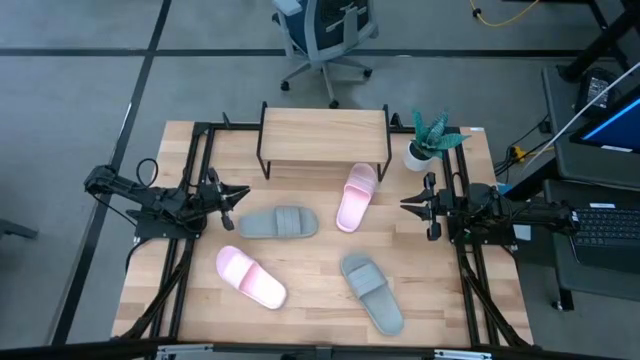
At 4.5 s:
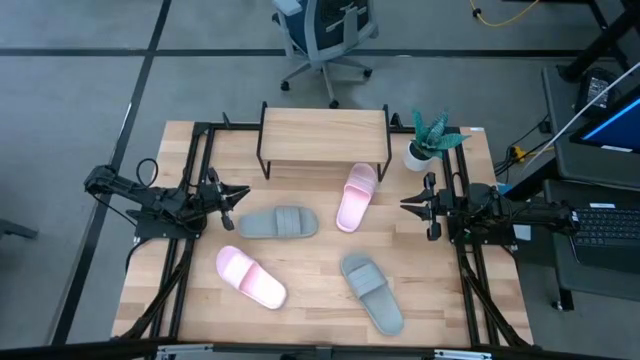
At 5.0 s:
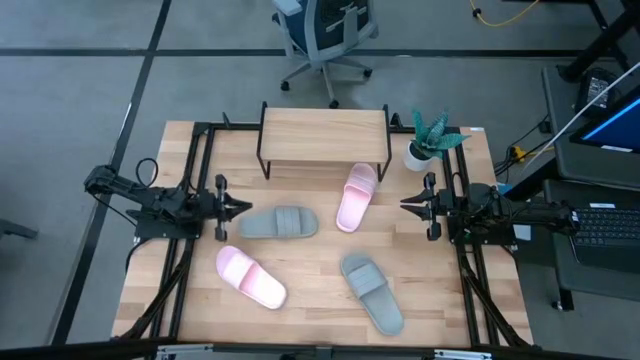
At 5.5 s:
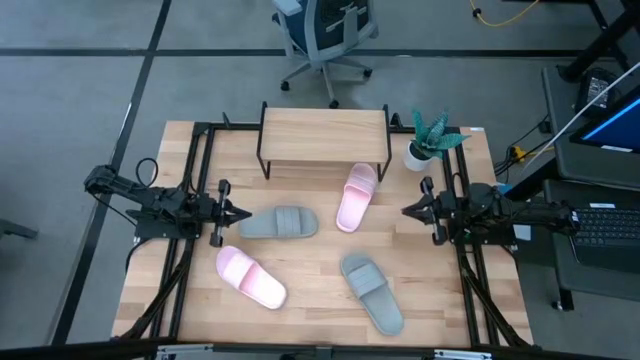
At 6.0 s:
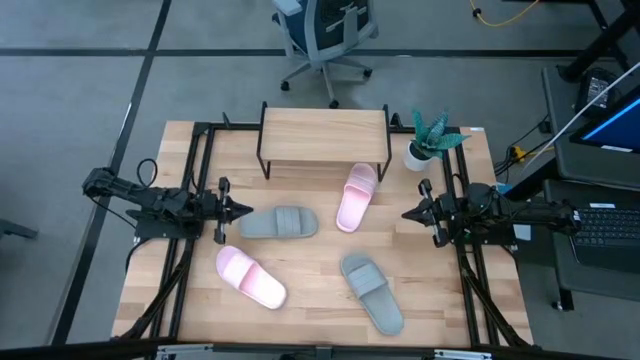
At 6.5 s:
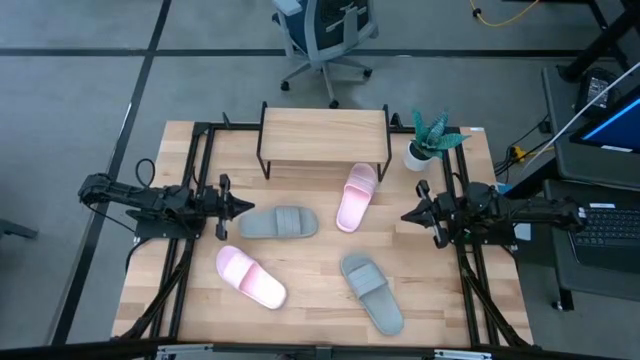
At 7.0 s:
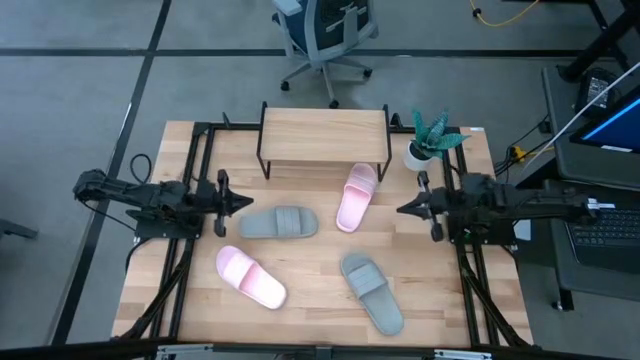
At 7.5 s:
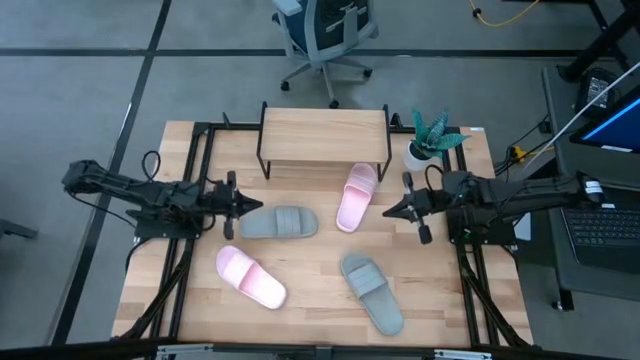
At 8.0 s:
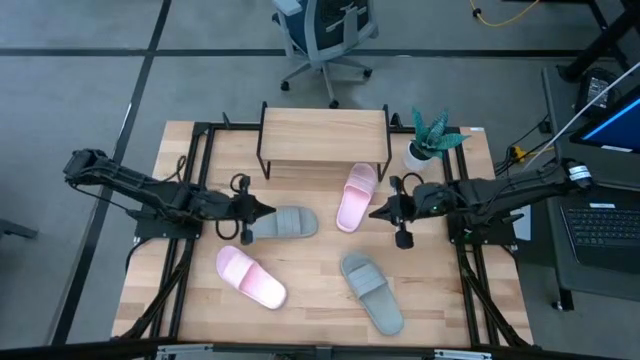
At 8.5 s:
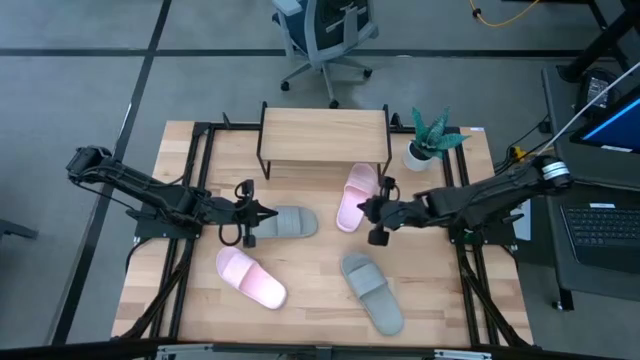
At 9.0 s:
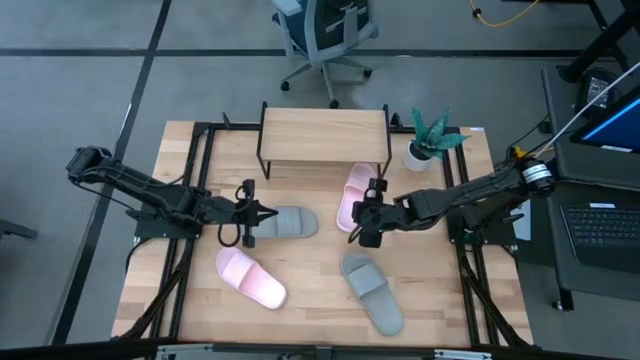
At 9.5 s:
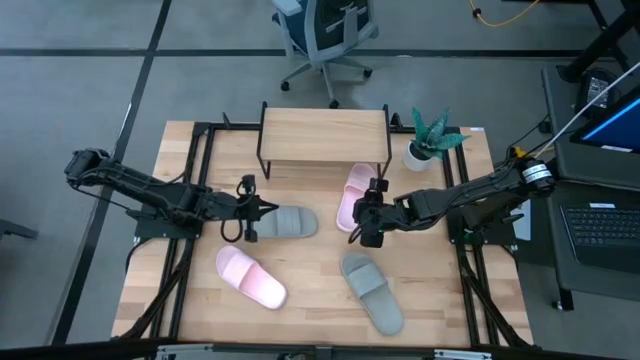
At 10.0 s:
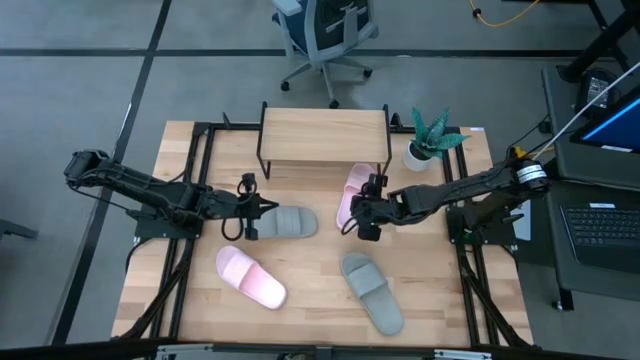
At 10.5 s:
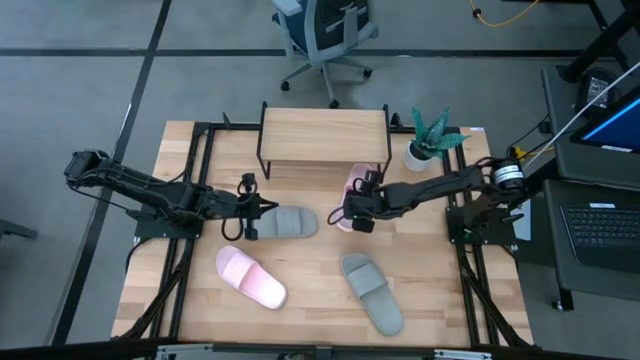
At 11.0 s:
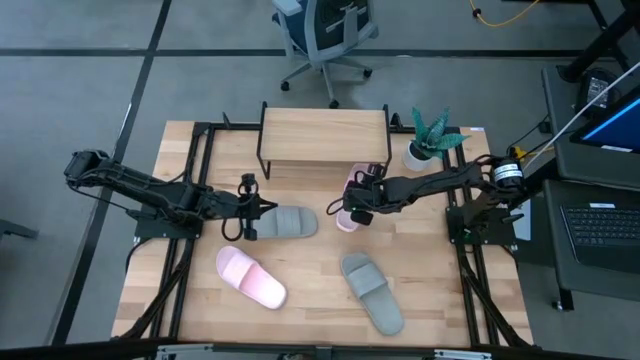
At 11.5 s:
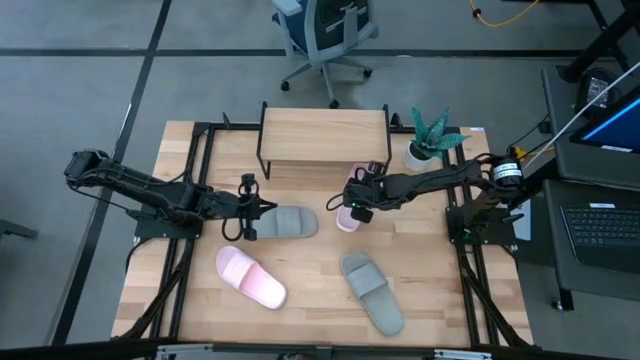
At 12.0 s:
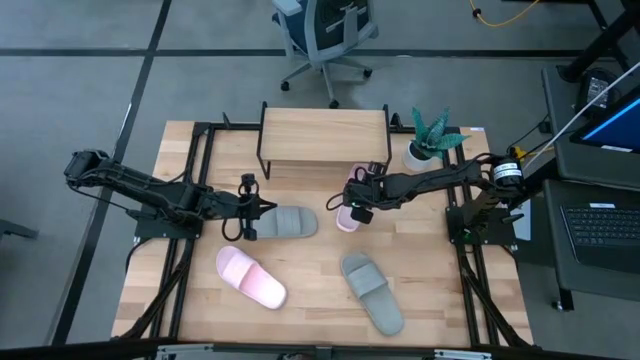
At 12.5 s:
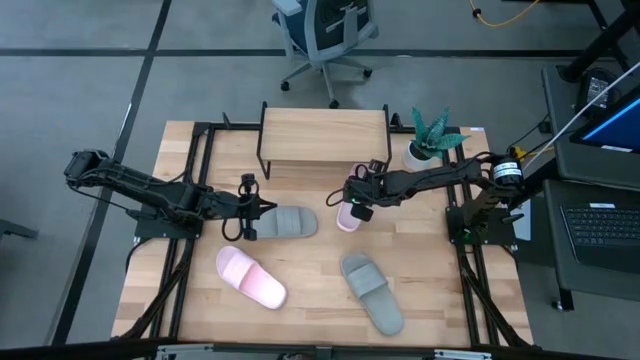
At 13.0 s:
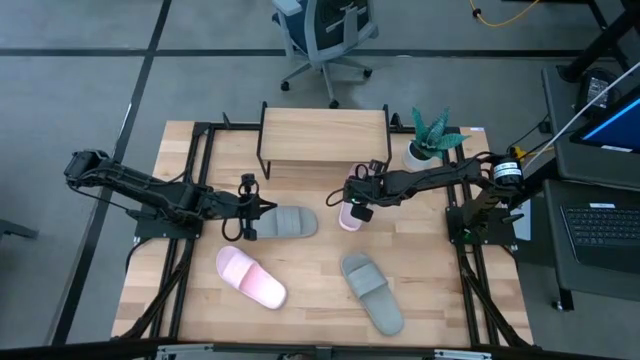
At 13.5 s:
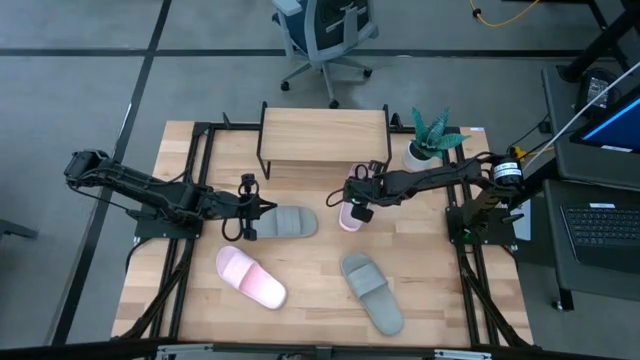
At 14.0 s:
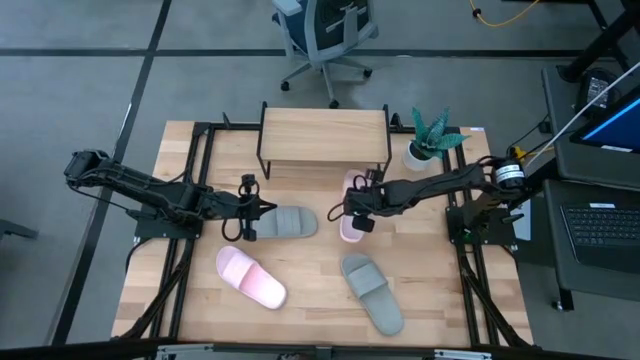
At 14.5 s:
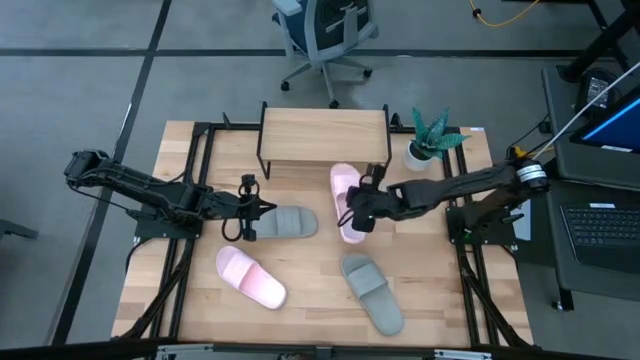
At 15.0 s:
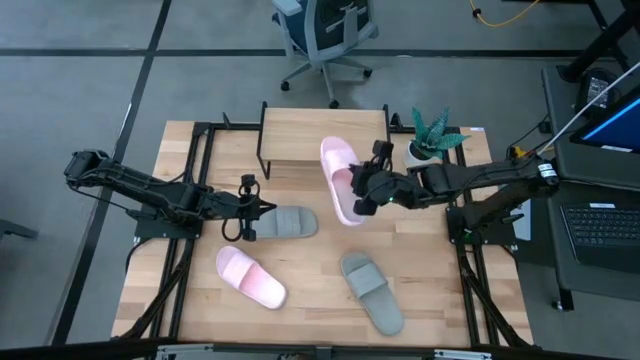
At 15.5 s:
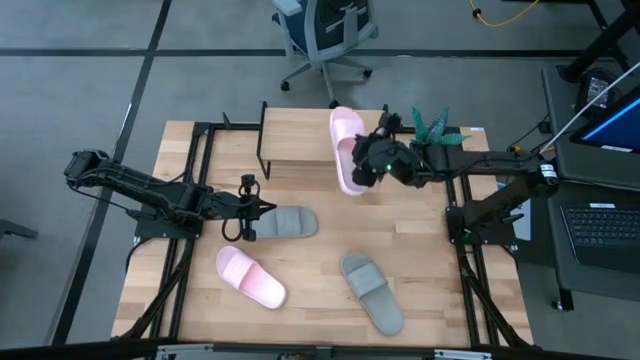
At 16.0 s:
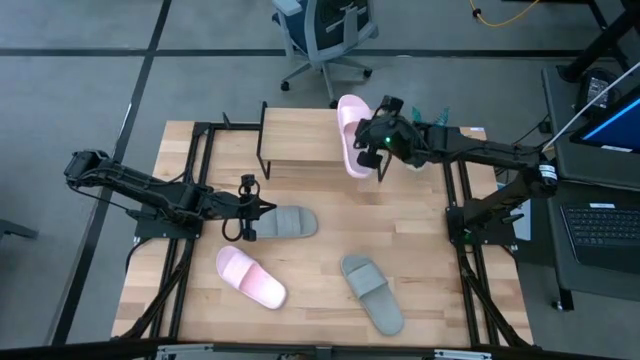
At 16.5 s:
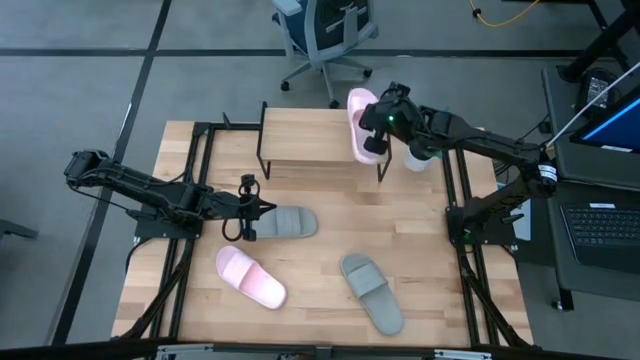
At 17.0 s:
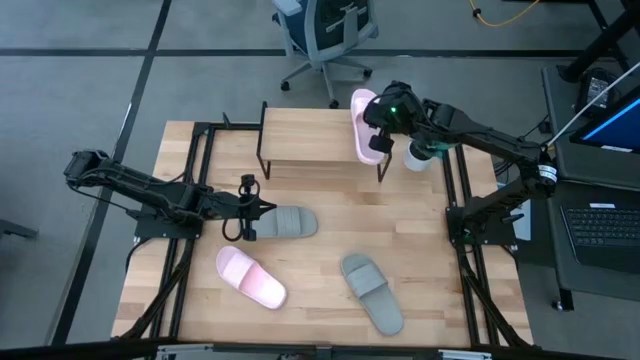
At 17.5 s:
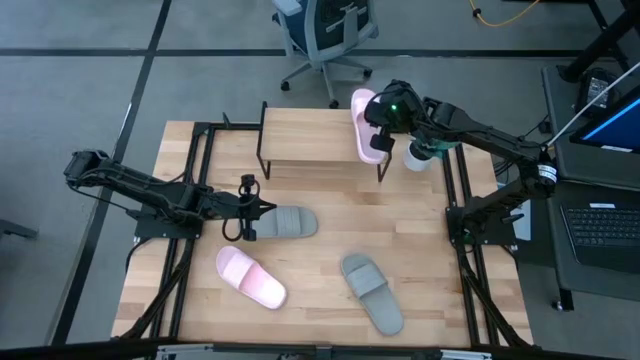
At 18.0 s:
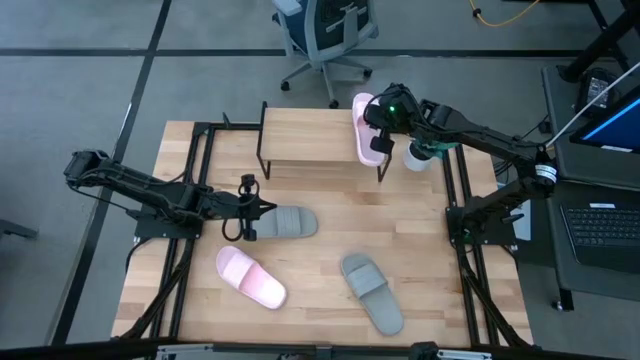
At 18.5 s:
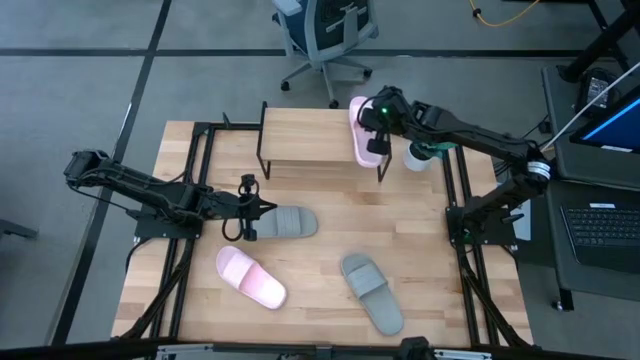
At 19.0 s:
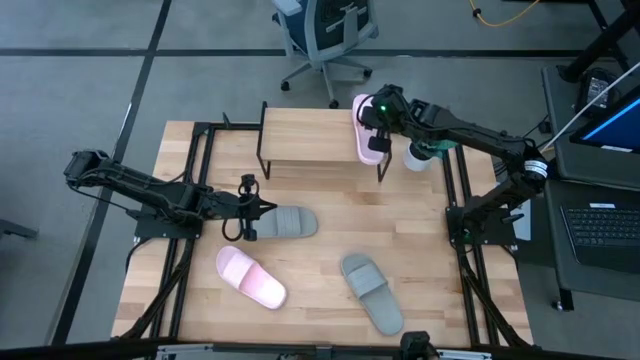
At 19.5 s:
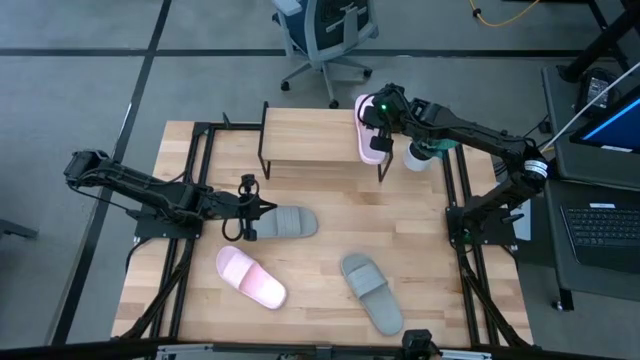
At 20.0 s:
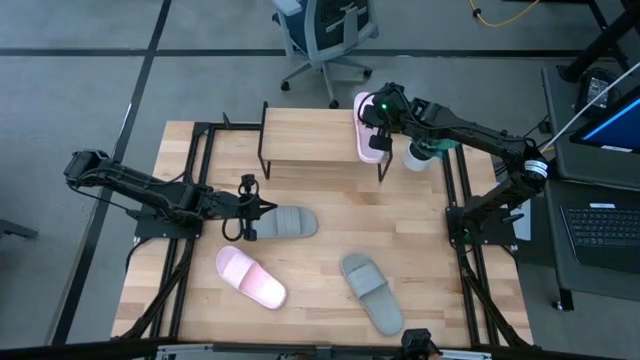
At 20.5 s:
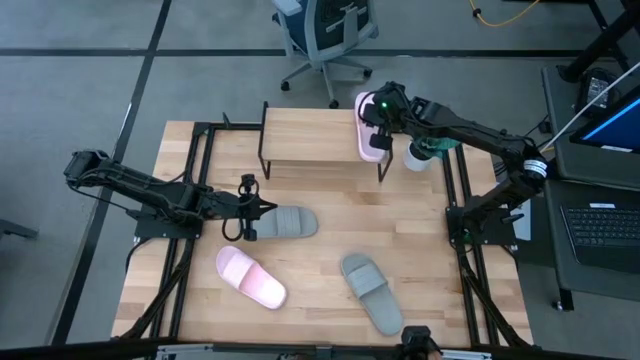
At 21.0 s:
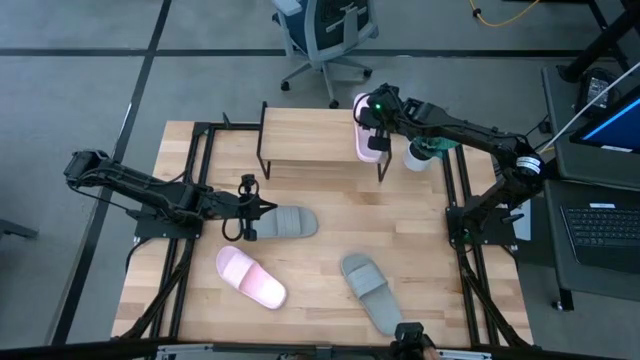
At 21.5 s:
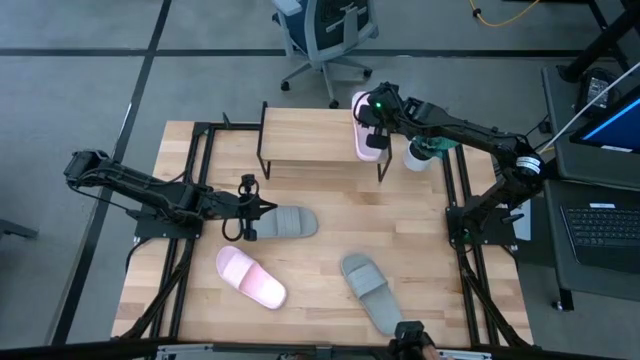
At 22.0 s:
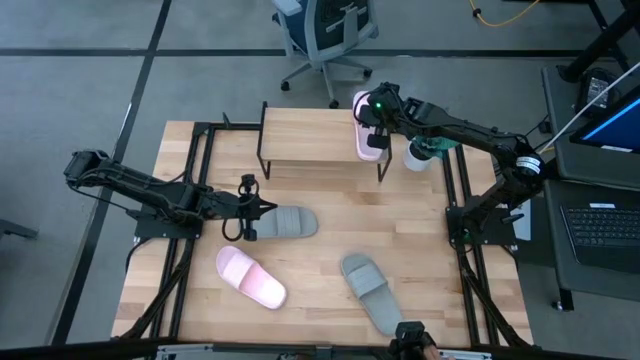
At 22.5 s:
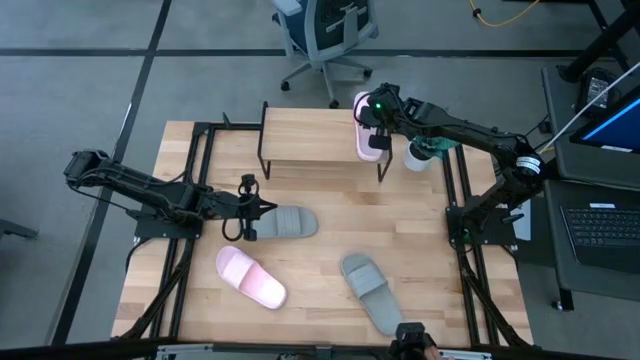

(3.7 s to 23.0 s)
Task: Pick and place slides into the shelf
Put the top pink slipper on the shelf

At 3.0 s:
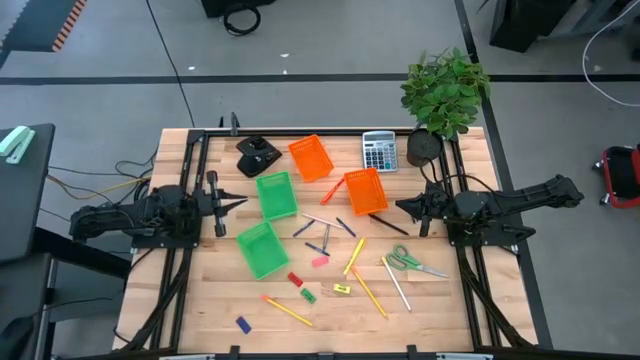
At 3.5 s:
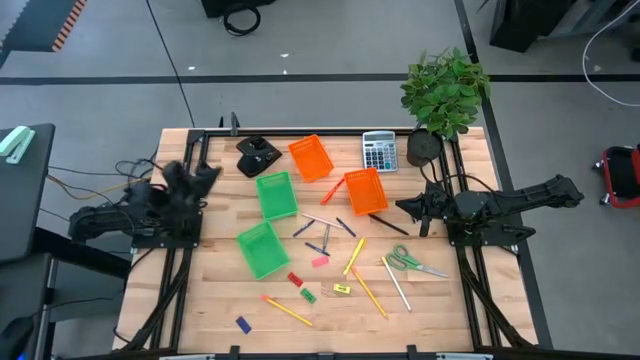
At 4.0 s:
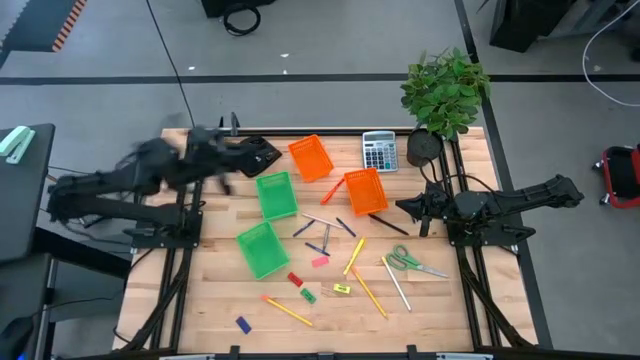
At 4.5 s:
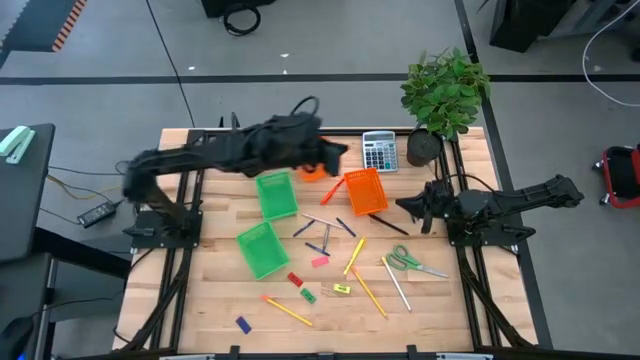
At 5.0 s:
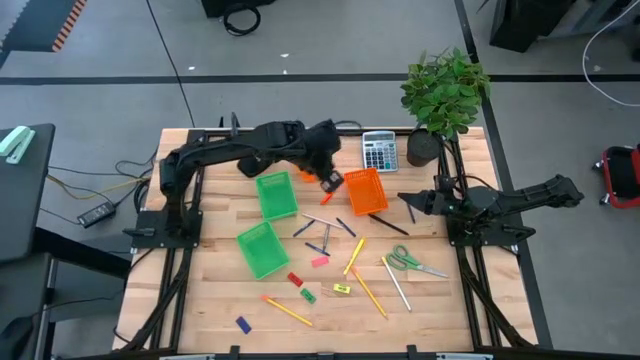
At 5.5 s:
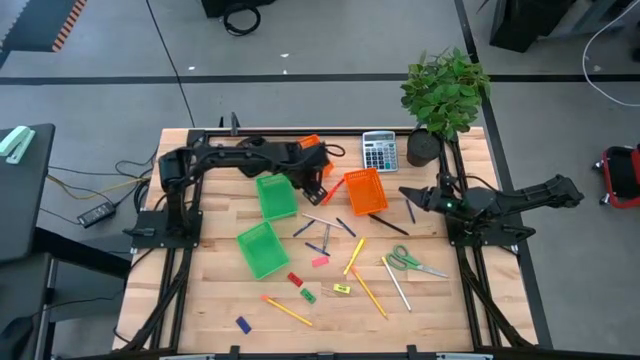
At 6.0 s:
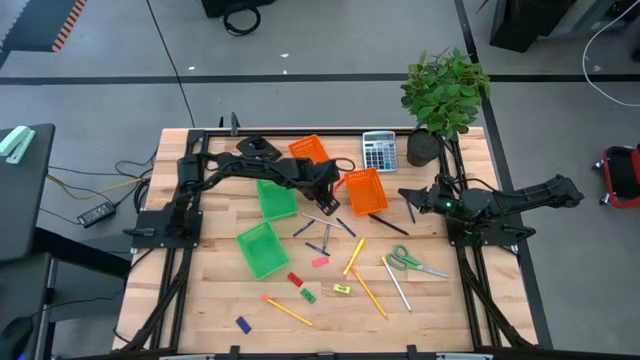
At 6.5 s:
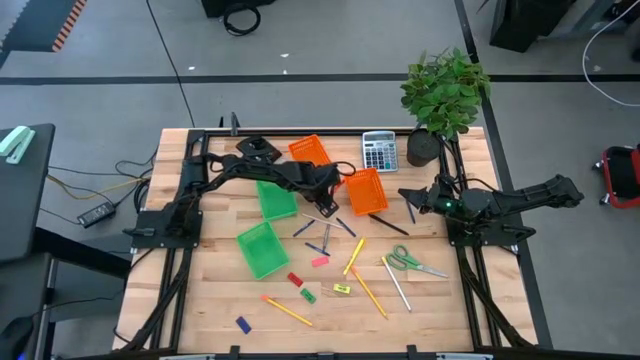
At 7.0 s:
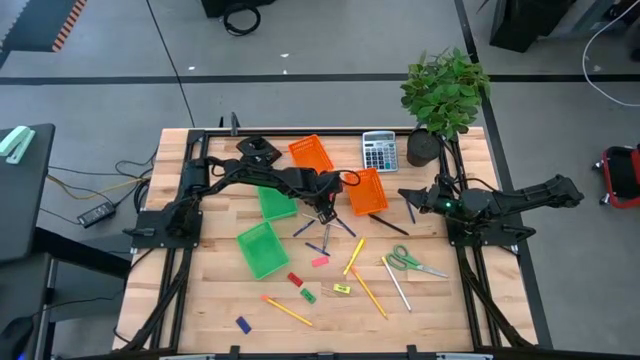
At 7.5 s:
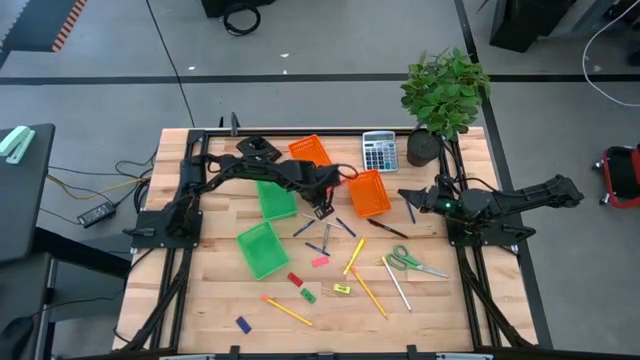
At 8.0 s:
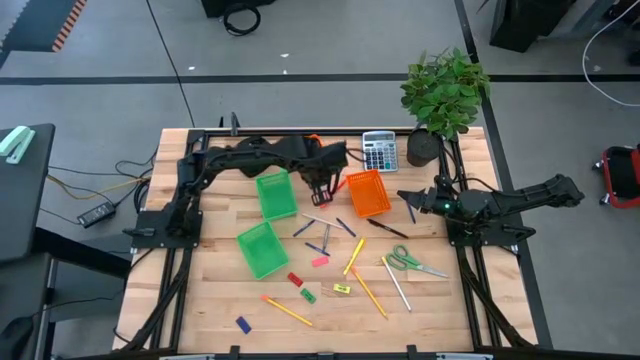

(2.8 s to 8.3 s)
Task: Sort crayons/erasers/pens/pencils in bins
Put the orange pen into the top green bin
